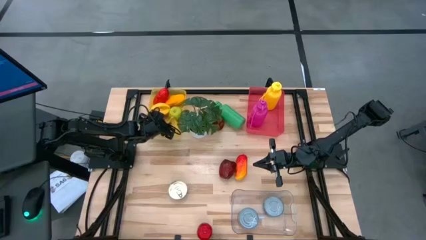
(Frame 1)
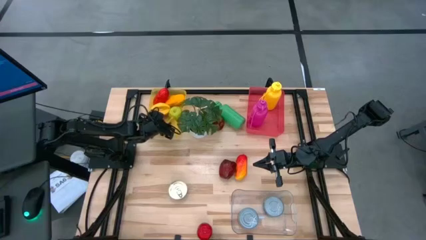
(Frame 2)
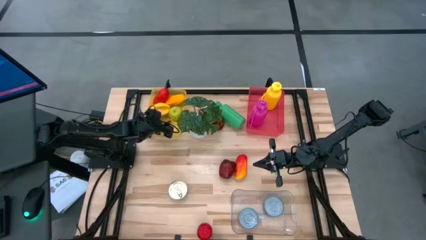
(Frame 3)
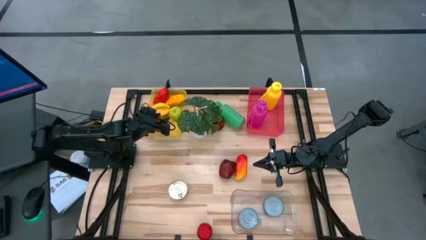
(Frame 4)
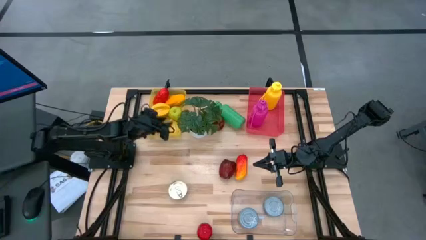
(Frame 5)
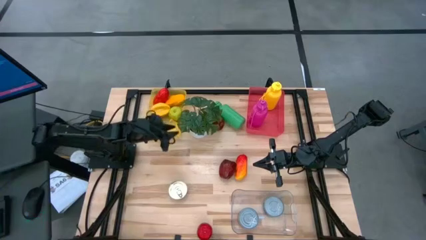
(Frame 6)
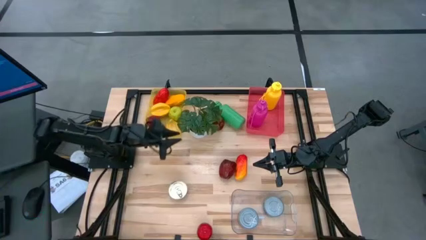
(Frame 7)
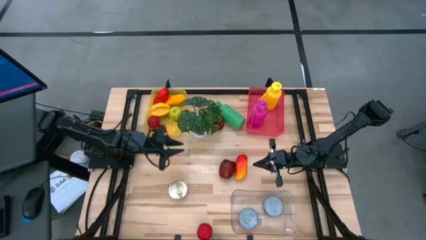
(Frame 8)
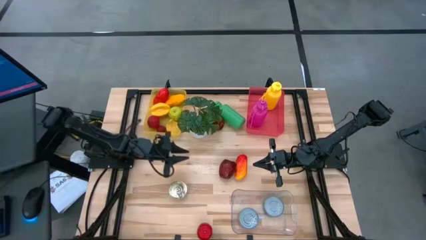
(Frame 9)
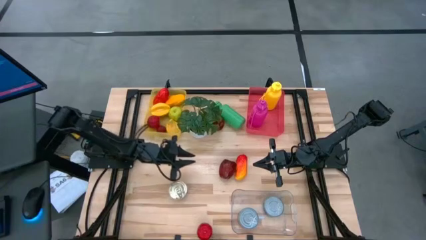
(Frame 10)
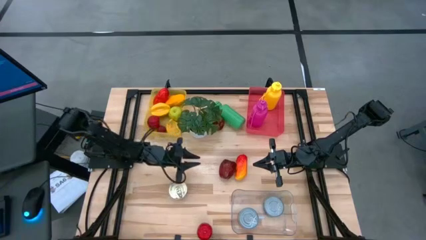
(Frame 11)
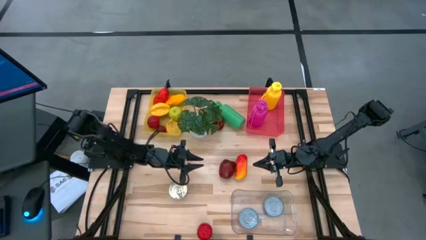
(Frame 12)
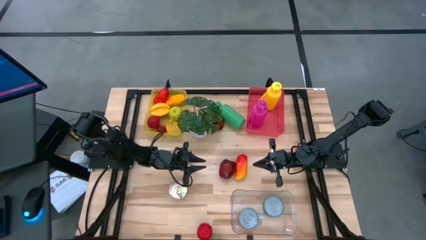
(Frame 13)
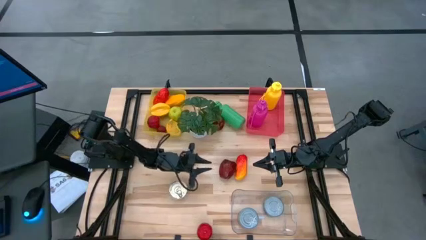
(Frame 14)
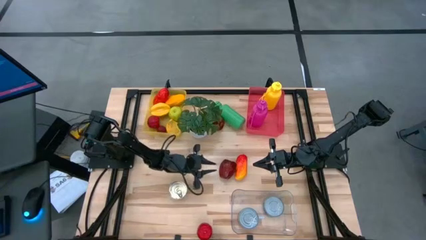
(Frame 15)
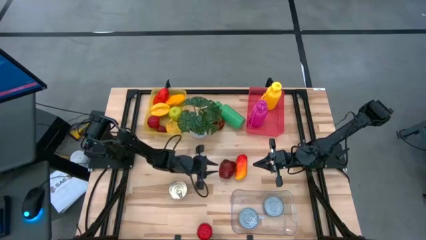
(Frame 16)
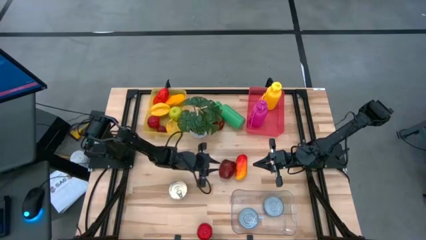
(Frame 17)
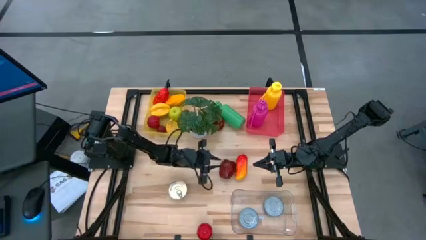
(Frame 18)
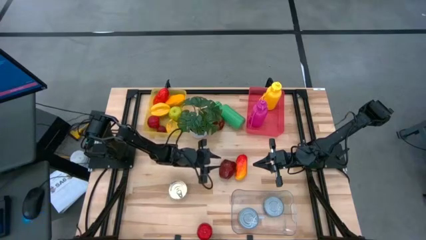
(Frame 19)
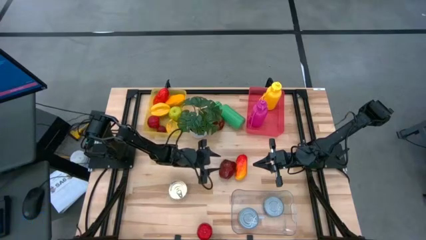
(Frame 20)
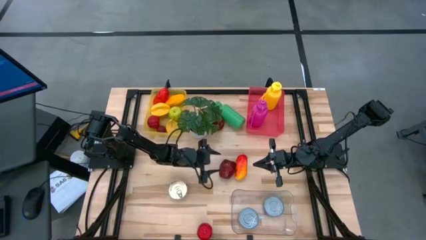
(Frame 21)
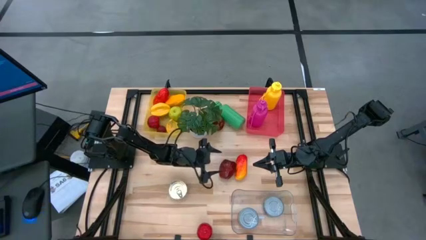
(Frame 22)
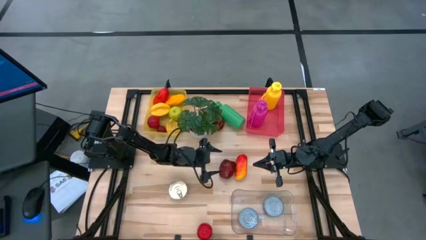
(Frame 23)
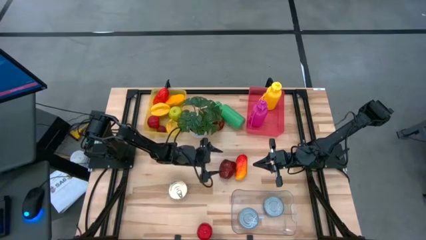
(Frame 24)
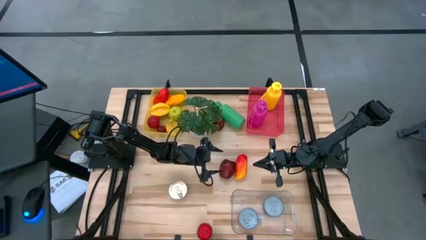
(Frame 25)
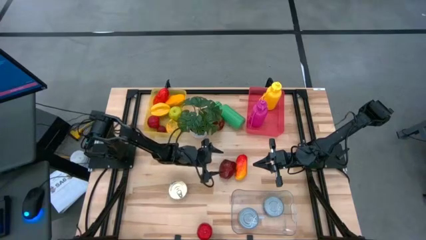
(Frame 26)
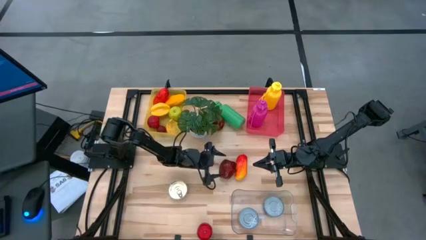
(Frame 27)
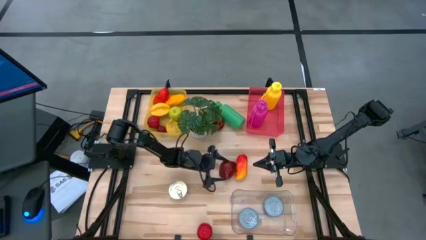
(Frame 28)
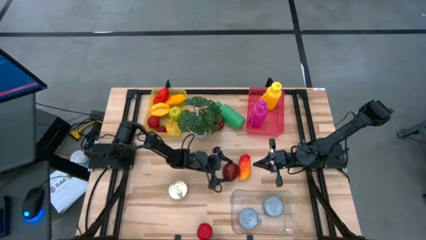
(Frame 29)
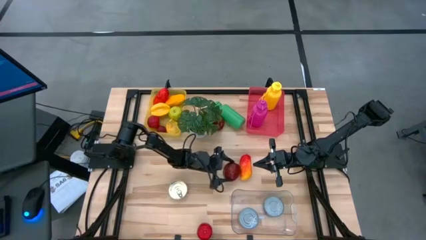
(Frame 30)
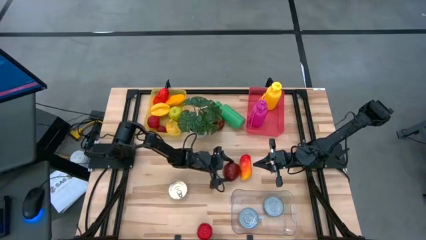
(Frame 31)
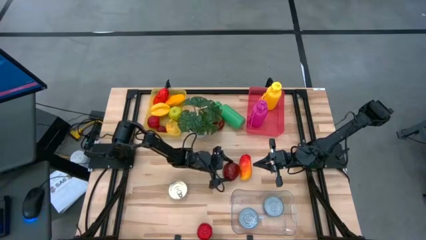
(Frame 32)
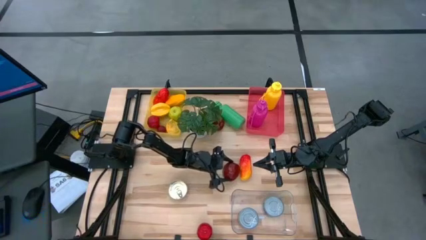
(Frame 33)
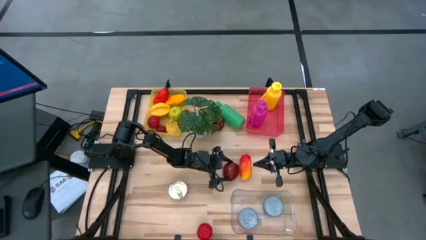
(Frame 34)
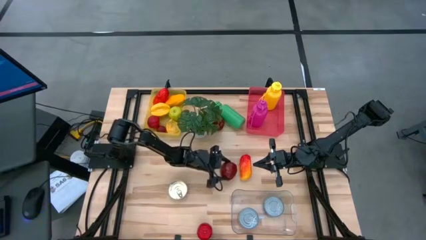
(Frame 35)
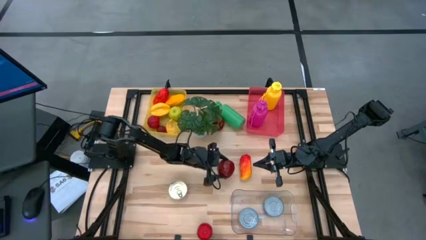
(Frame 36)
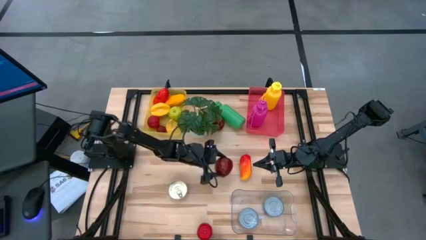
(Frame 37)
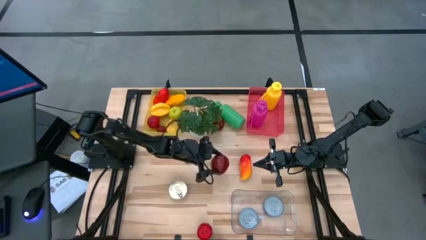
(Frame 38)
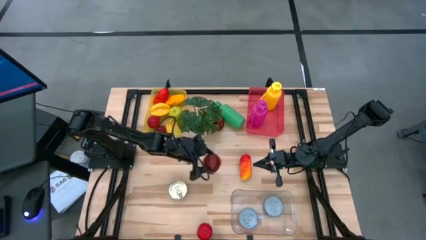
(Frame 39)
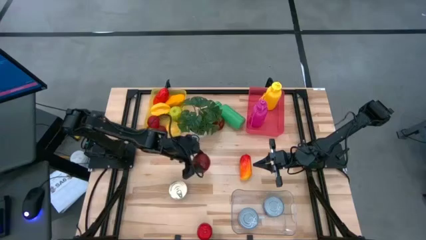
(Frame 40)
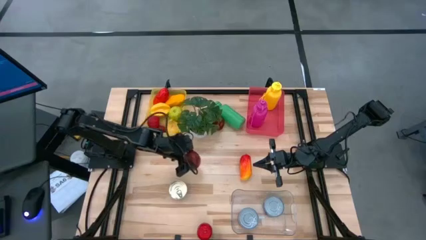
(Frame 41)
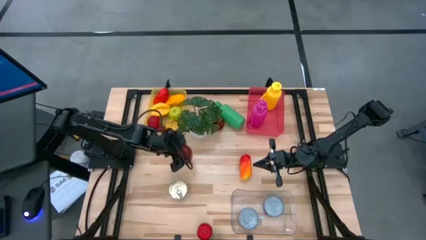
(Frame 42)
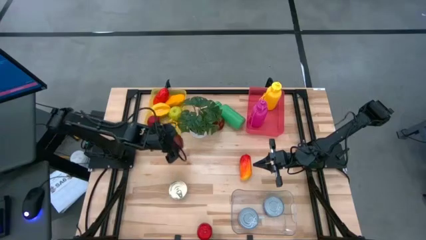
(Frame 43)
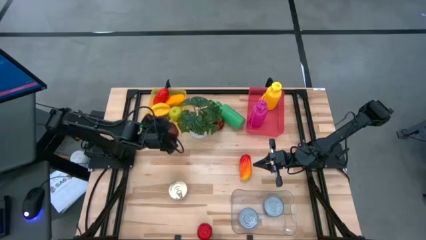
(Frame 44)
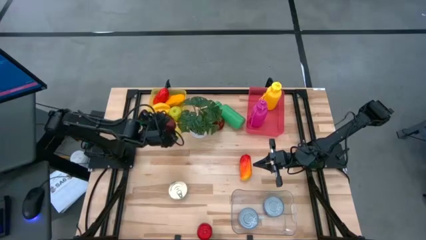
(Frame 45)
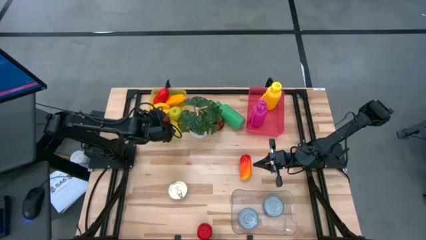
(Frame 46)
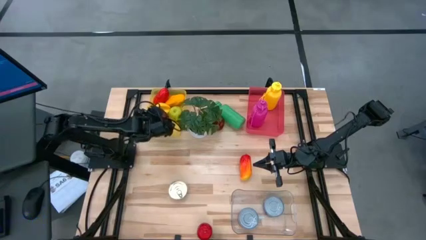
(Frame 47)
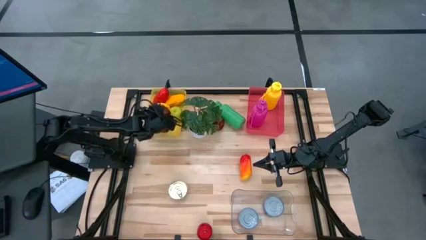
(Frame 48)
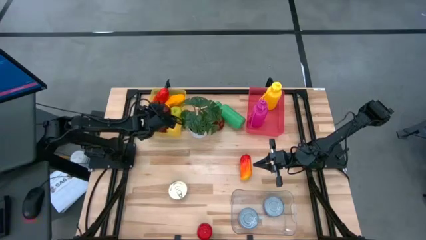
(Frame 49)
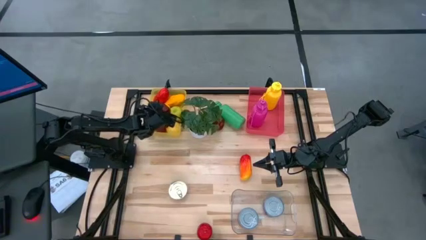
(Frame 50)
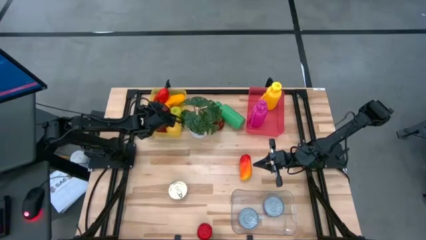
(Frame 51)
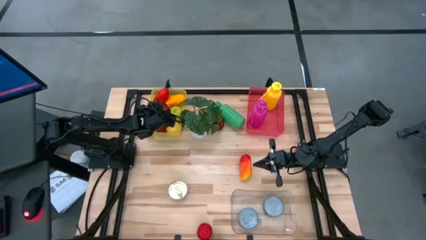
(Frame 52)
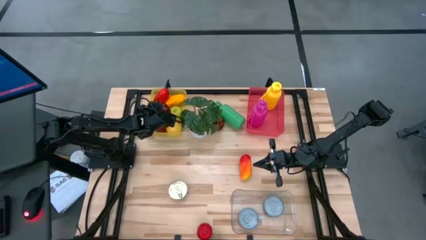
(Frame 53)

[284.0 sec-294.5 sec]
Task: Pick & Place Food Item
Put the dark red apple into the yellow bin

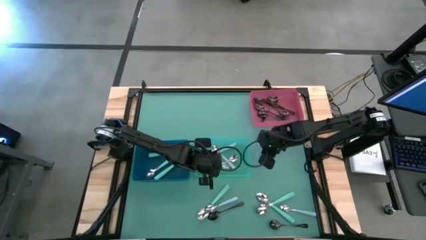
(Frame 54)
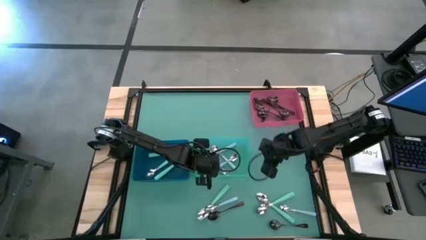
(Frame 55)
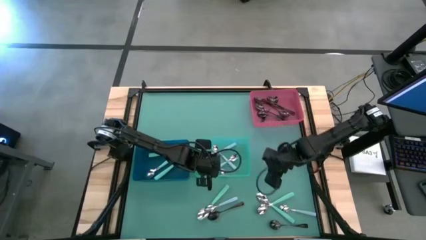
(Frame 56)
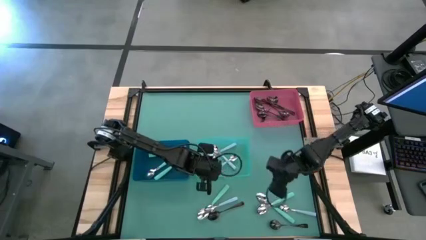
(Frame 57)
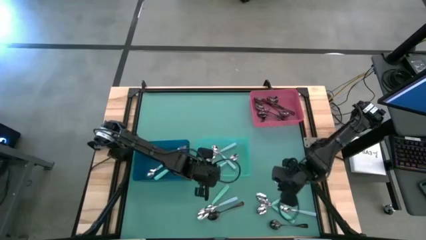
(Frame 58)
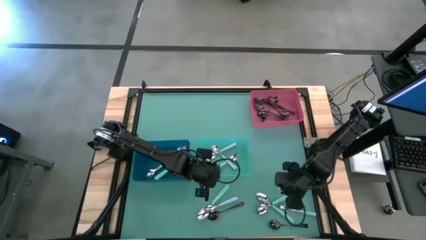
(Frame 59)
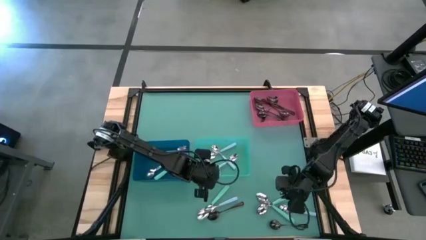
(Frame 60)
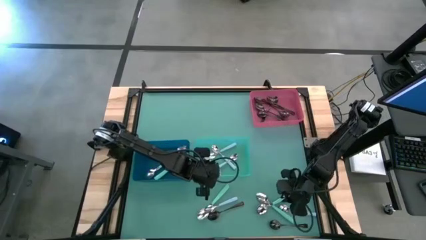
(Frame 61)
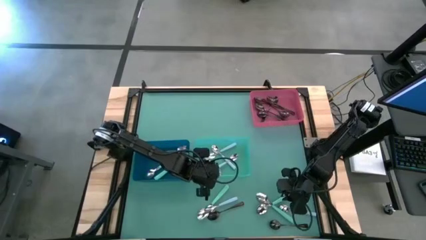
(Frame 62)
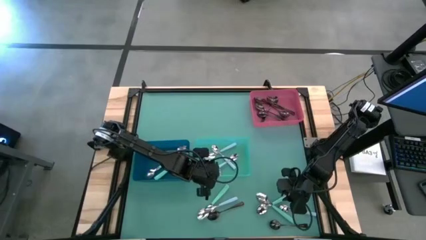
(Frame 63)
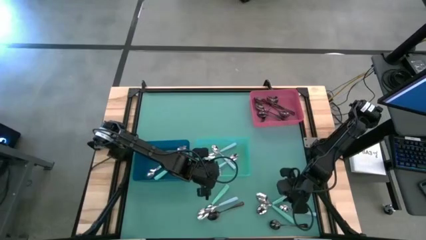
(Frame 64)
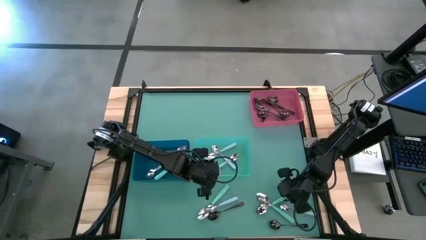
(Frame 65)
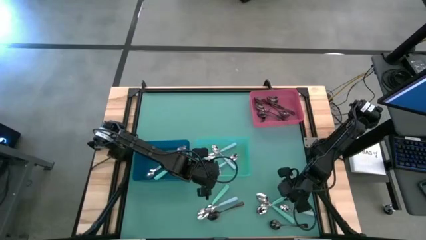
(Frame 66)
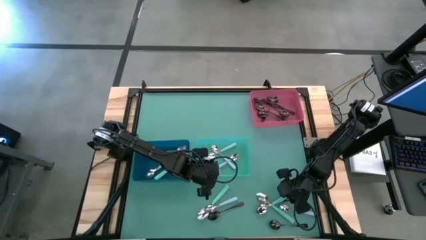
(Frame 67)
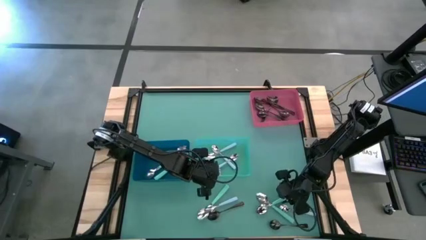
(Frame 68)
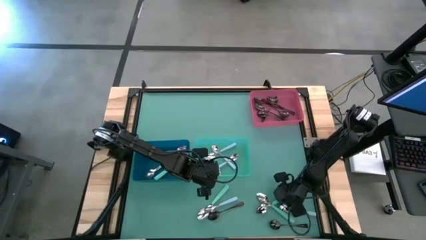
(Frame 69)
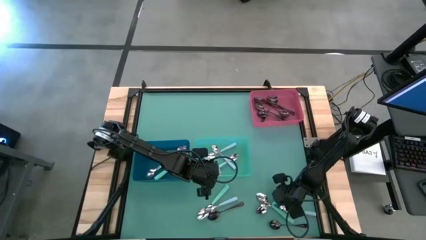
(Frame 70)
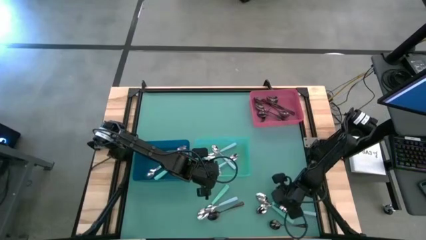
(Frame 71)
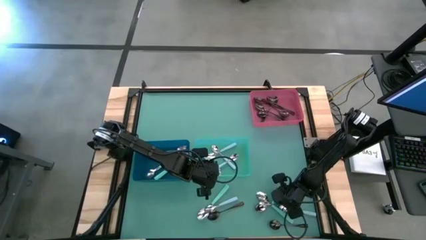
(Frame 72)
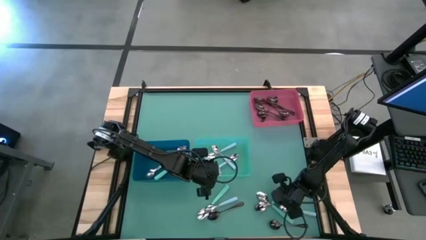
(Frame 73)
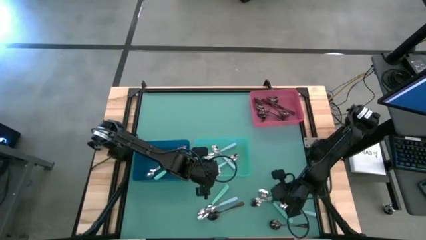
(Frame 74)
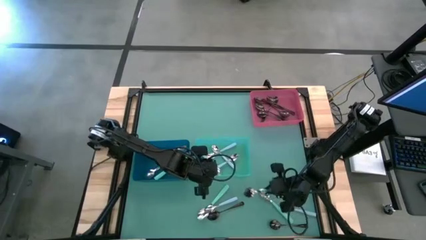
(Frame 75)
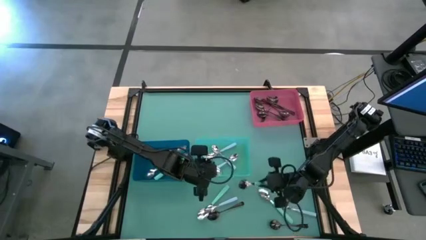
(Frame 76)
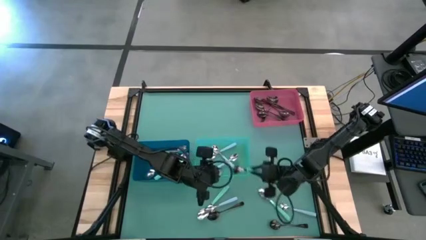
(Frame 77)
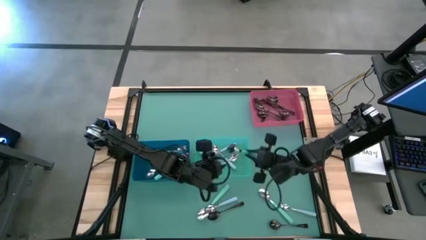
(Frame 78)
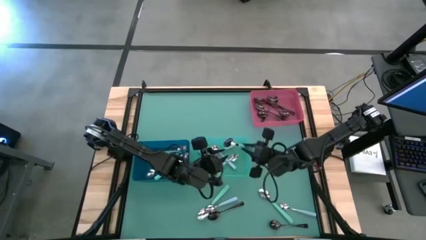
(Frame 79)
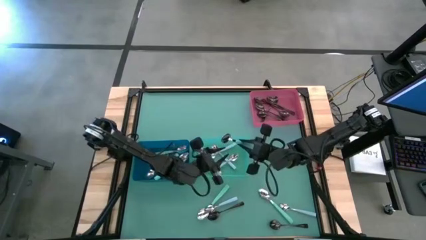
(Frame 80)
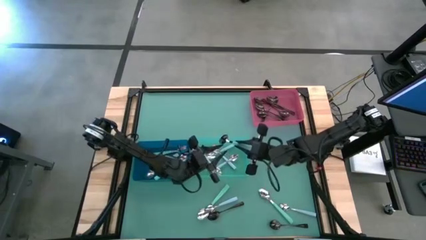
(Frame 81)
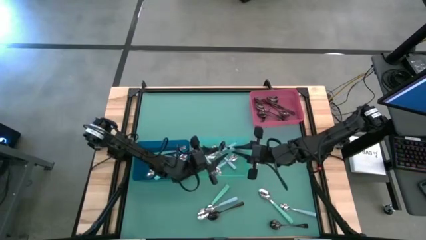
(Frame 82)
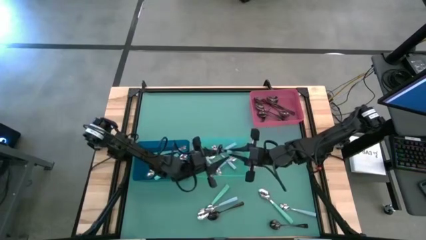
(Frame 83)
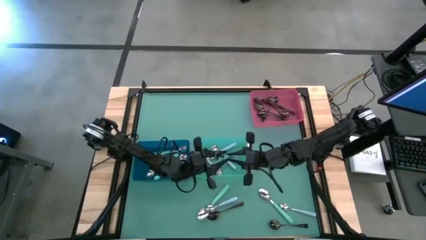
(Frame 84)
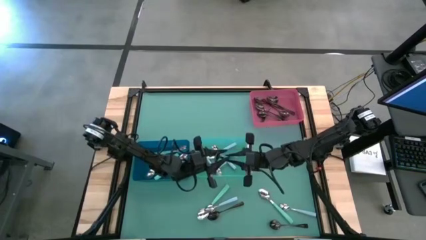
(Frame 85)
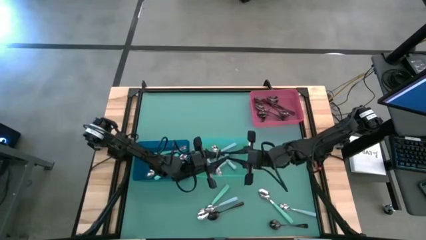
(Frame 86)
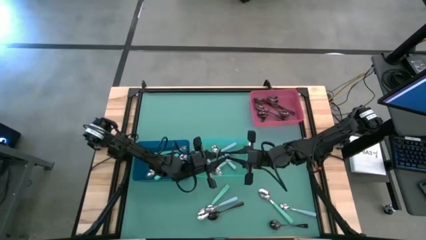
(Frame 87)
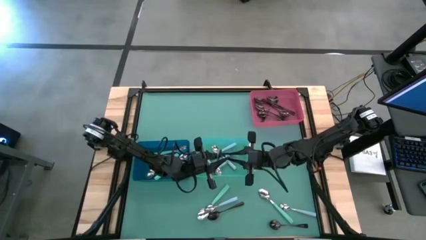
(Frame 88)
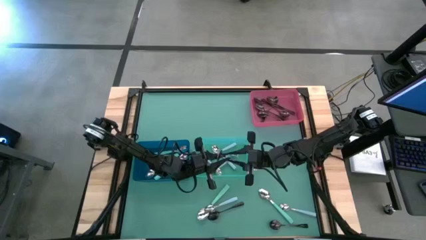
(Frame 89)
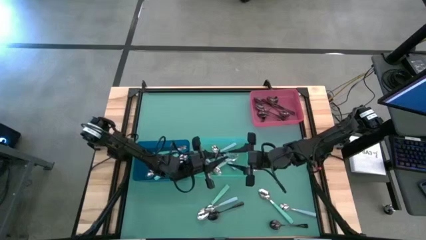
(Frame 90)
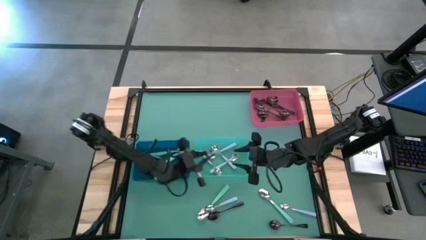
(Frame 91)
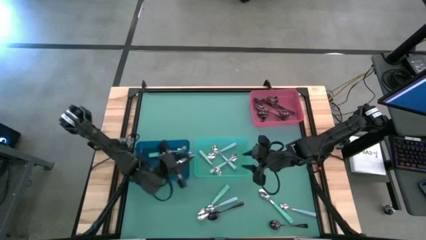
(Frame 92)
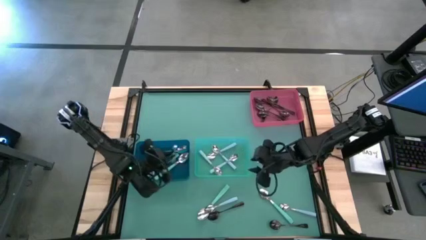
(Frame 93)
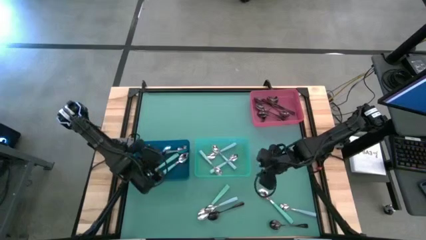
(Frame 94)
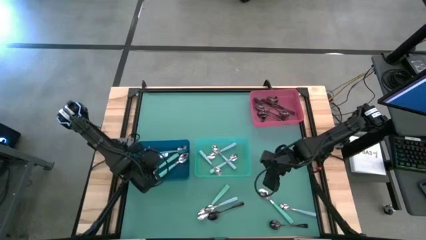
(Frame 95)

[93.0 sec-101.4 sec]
Task: Sort silverware by color (type)
Put the green spoon into the blue bin
